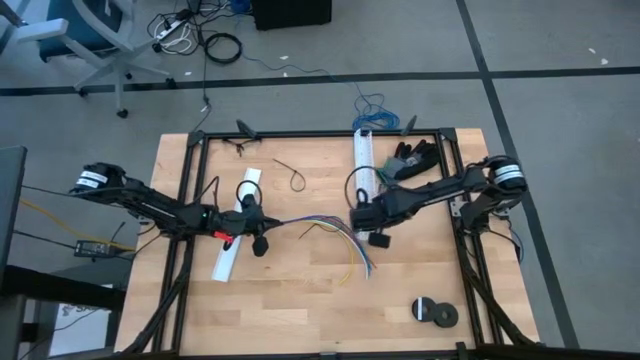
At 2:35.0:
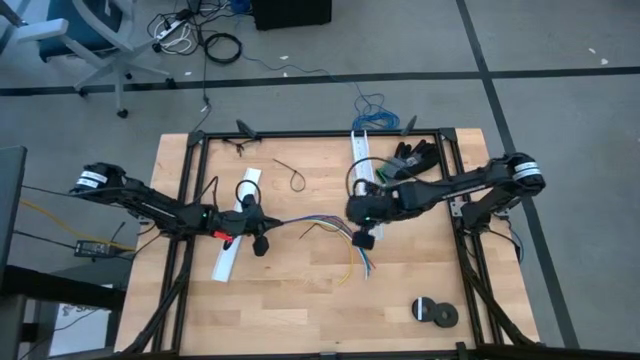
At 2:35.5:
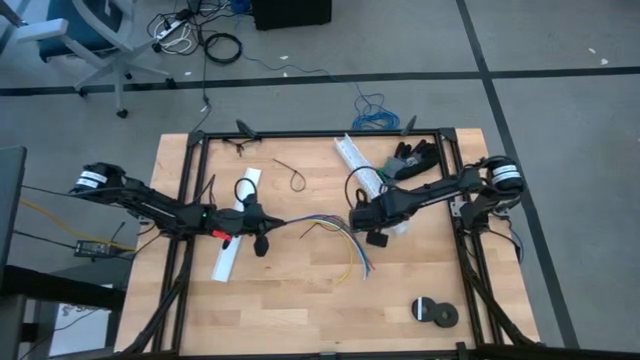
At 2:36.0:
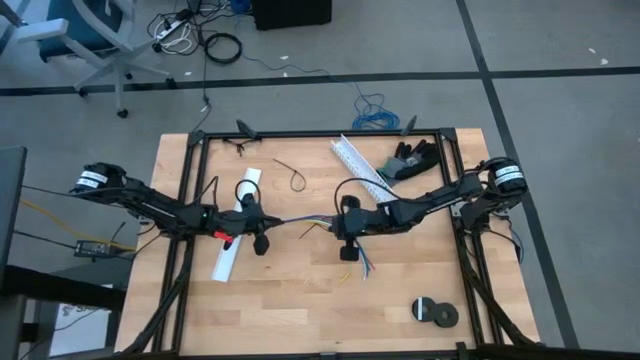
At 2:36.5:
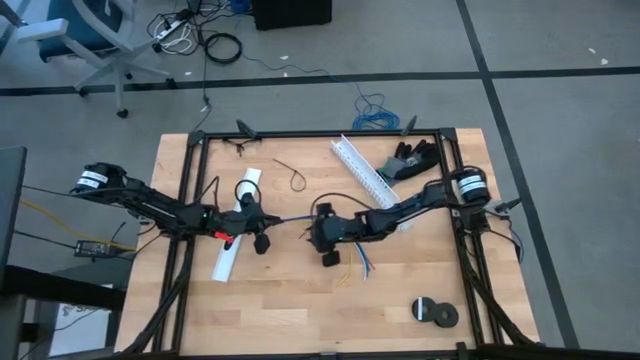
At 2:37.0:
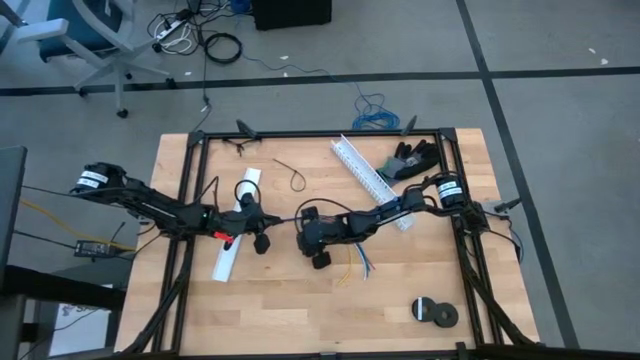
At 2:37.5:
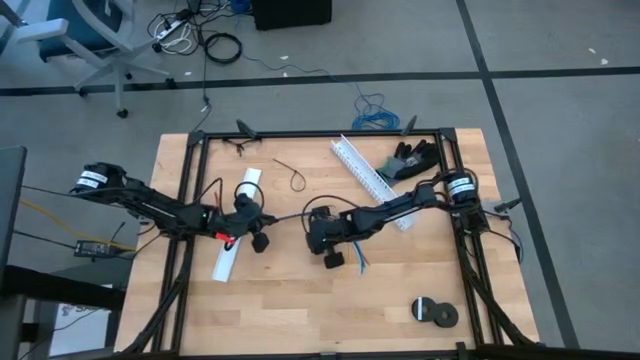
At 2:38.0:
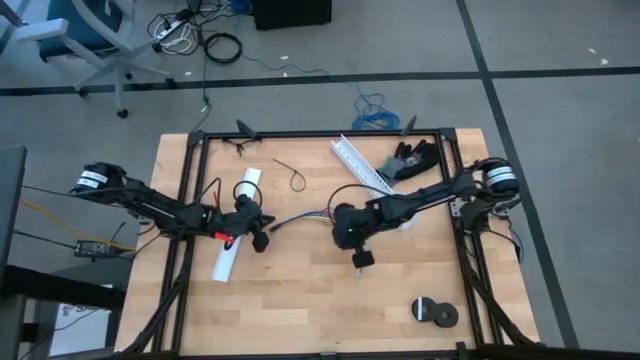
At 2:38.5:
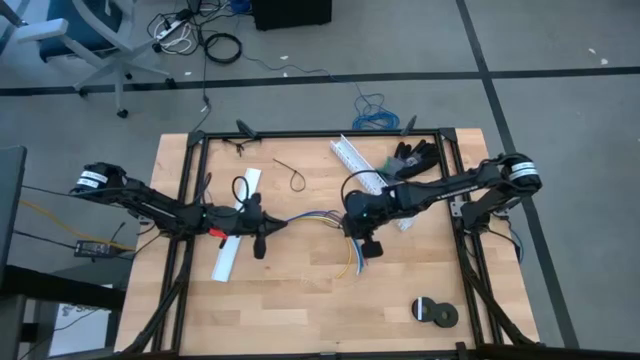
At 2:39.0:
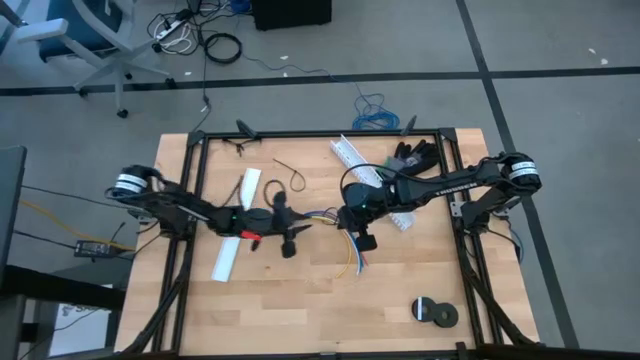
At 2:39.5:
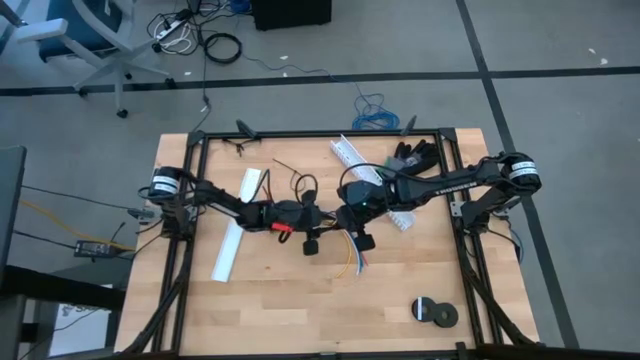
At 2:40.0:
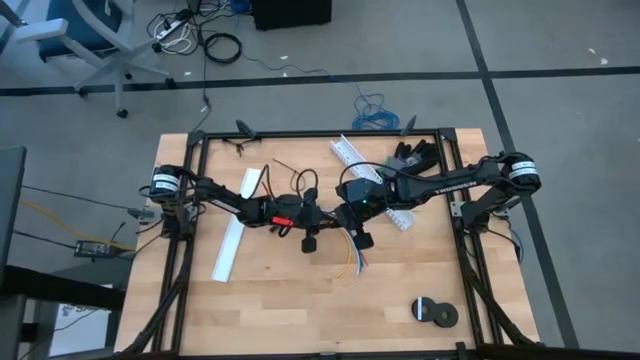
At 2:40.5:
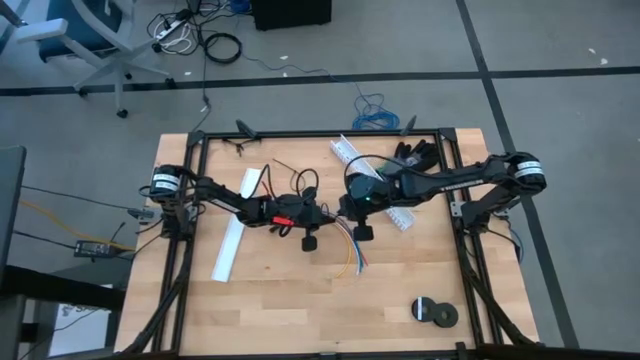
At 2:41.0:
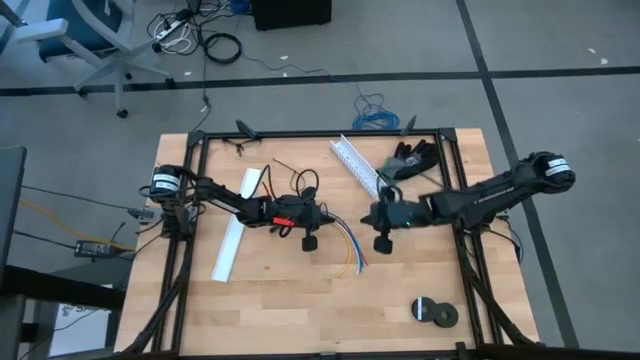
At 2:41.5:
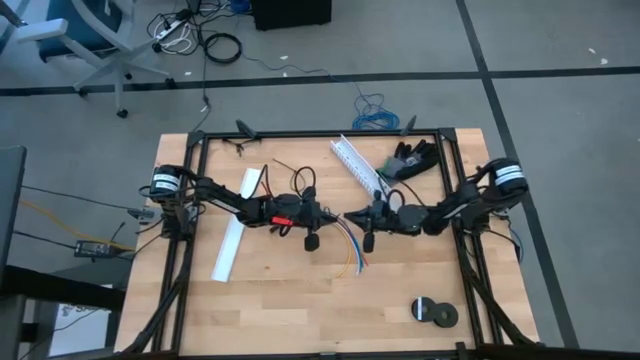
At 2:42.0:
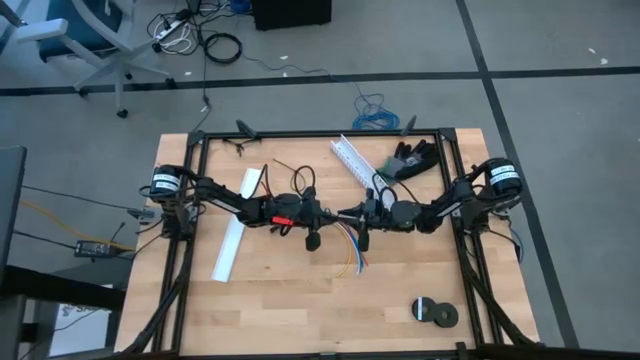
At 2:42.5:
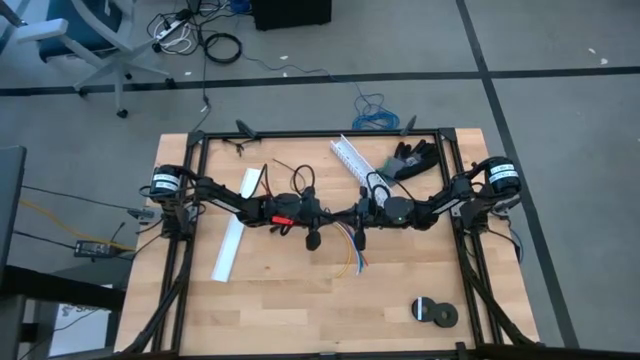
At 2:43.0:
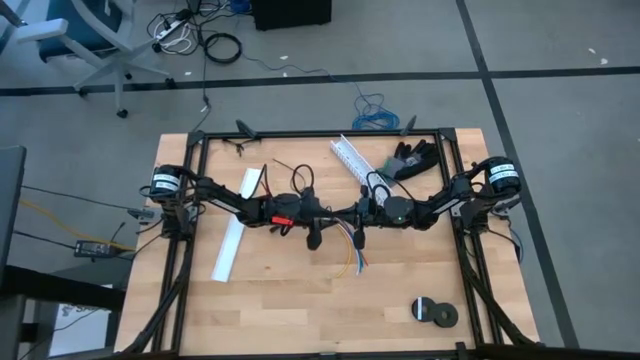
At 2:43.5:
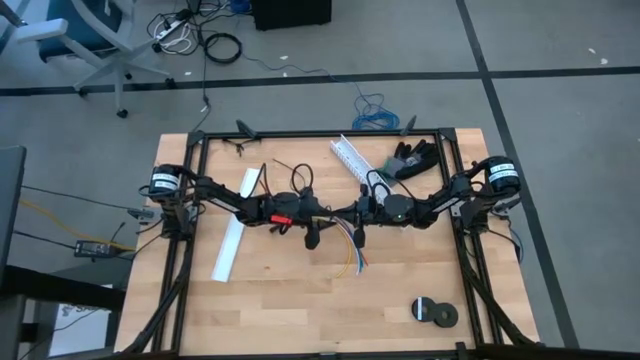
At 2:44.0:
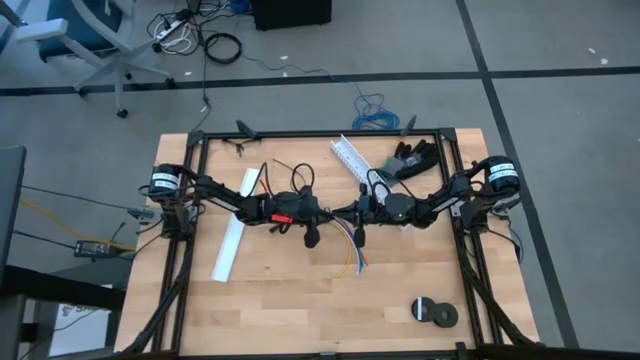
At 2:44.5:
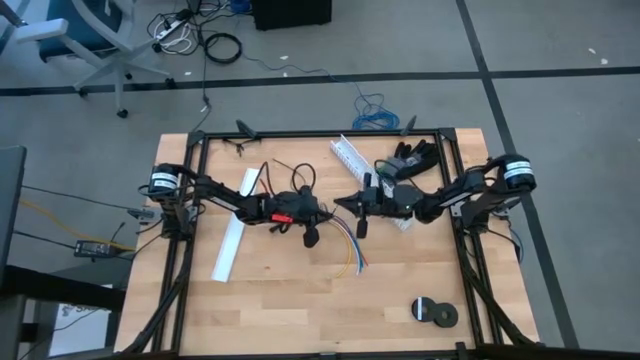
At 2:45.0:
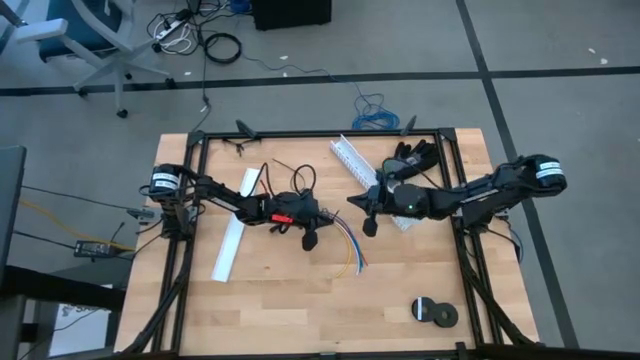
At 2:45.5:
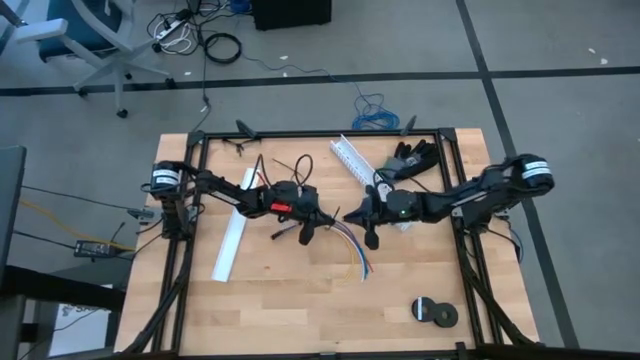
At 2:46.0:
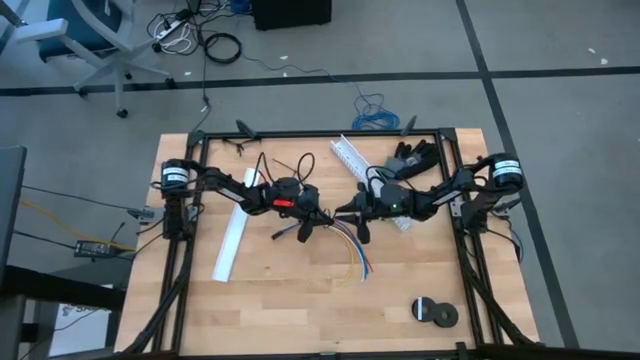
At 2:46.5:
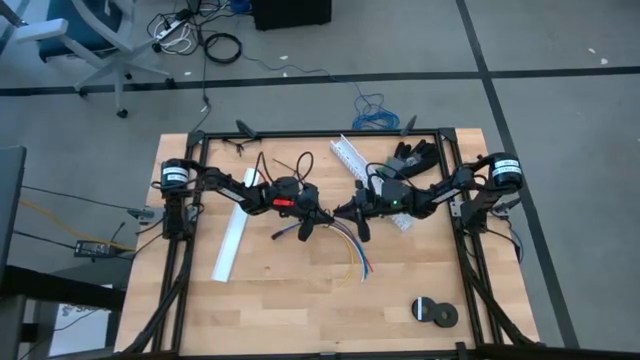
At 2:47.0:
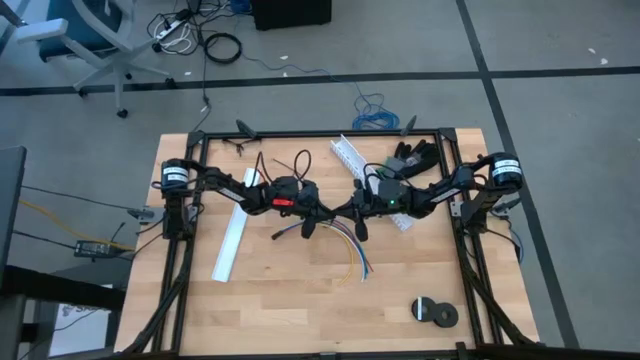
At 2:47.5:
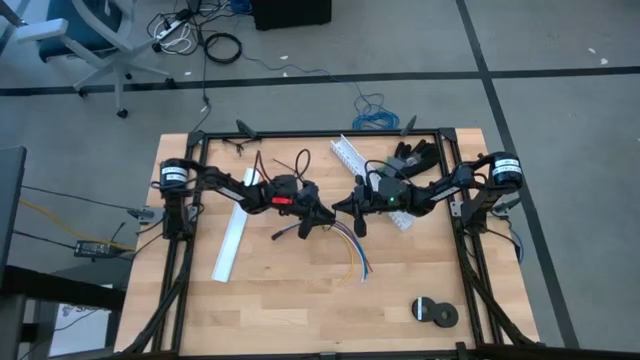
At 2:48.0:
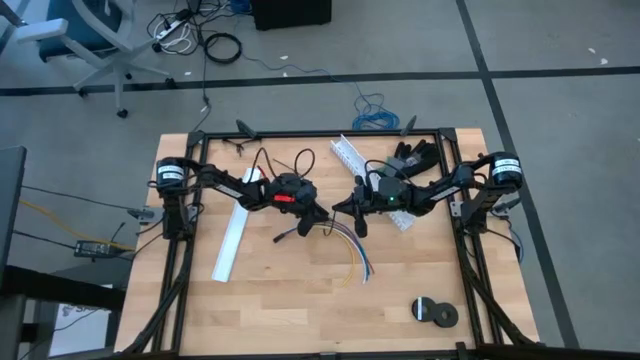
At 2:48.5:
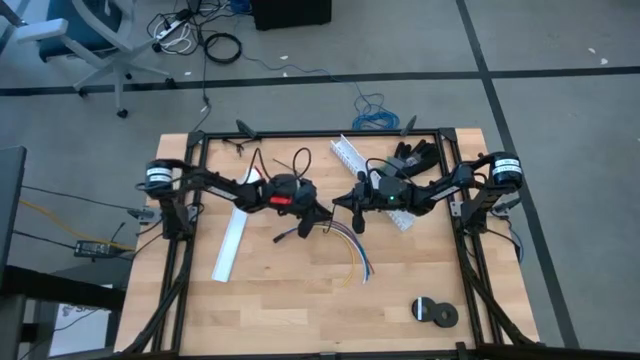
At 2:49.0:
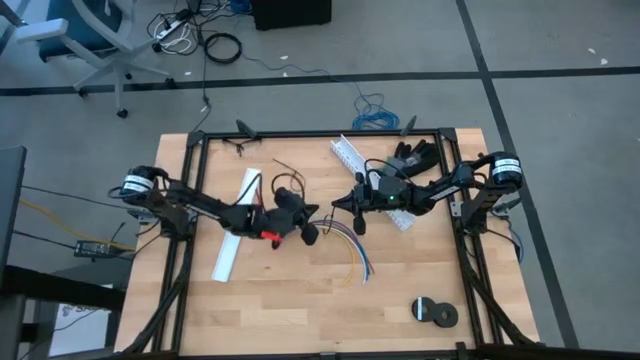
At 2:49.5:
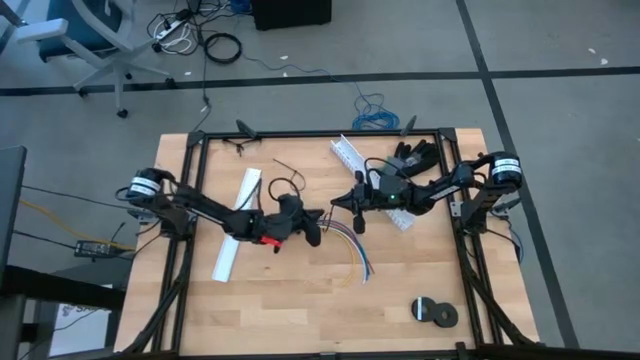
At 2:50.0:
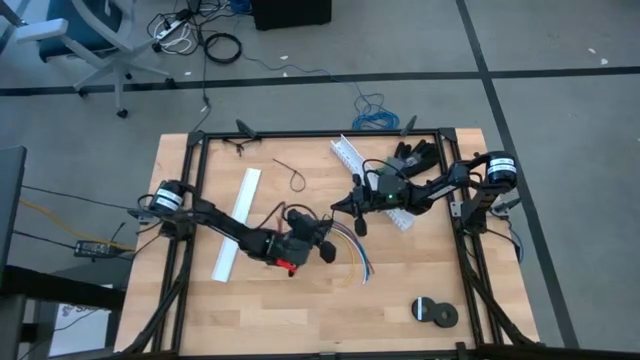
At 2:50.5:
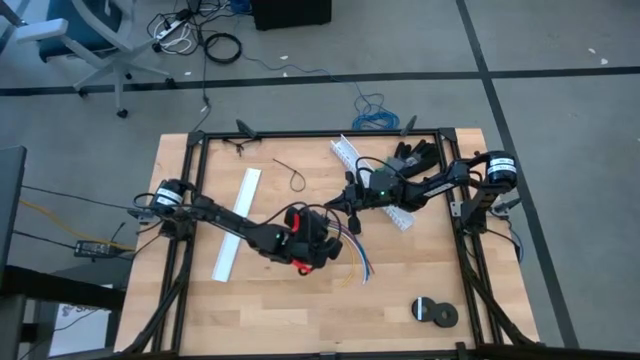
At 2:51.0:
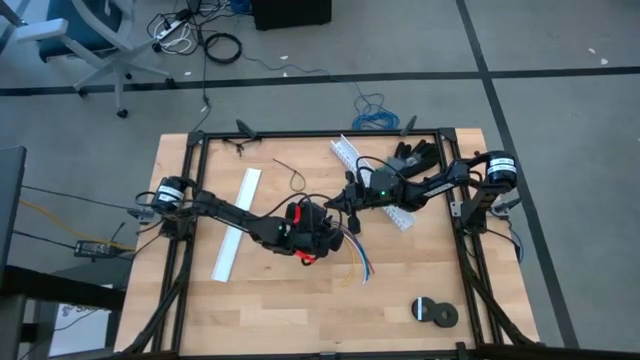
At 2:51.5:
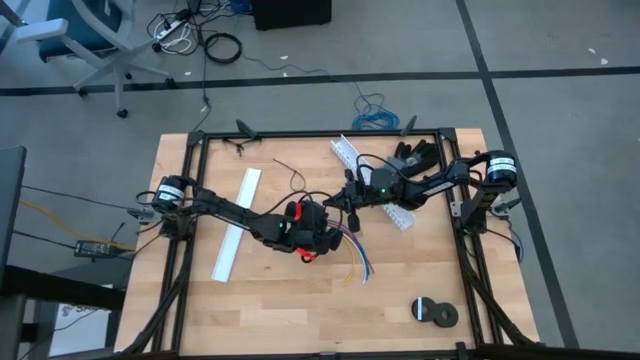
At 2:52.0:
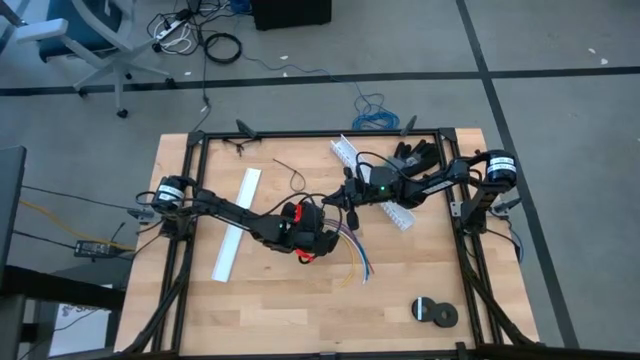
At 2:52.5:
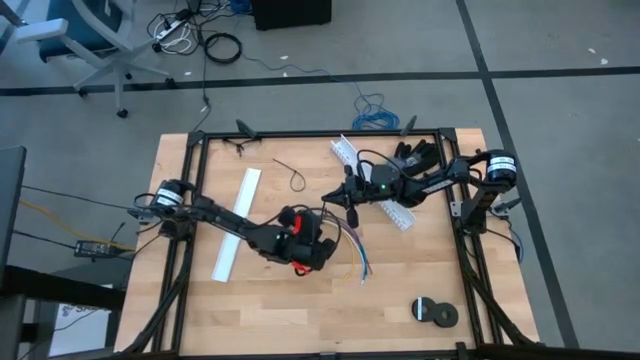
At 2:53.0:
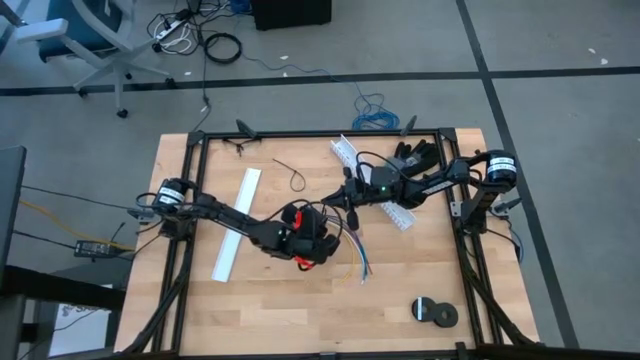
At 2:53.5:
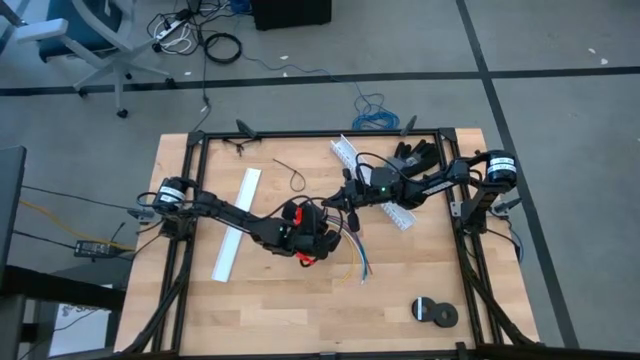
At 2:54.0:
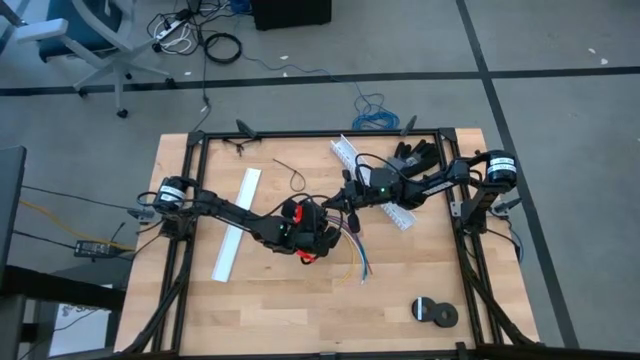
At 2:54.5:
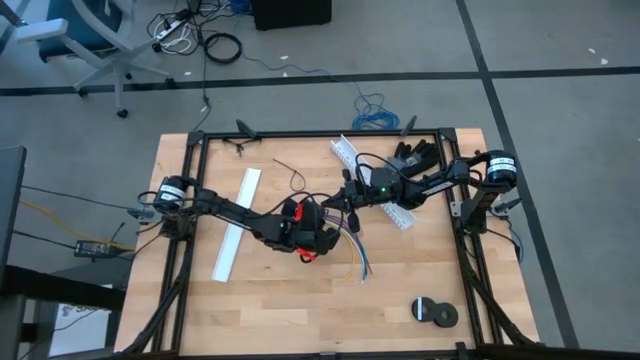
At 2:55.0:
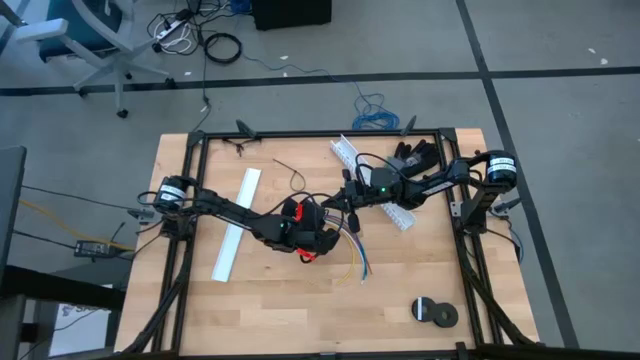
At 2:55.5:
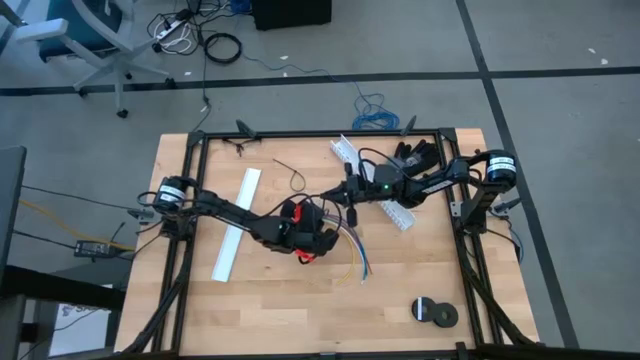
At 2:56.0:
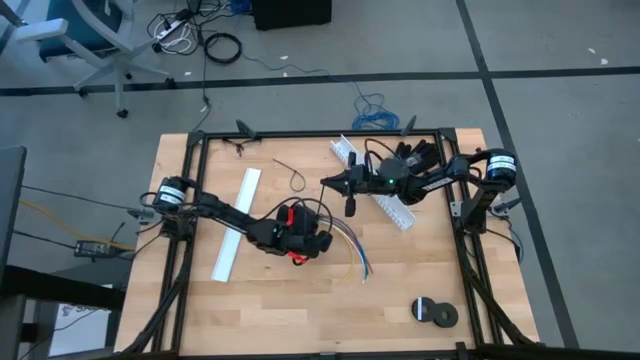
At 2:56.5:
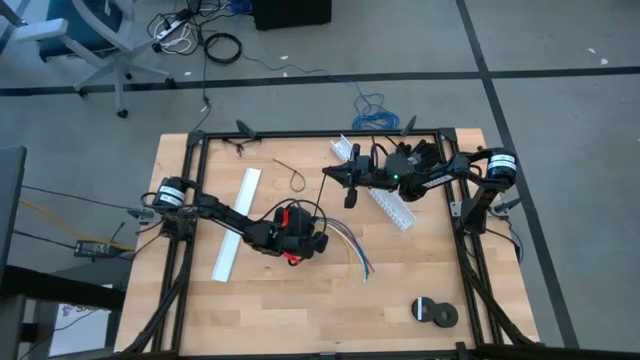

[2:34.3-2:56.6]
Task: Ziptie cables
Wrap the cable wires with black zip tie
